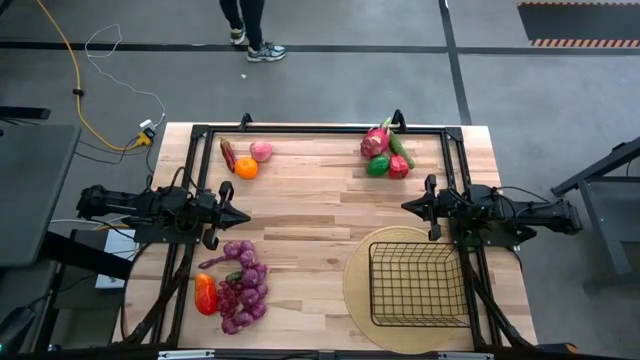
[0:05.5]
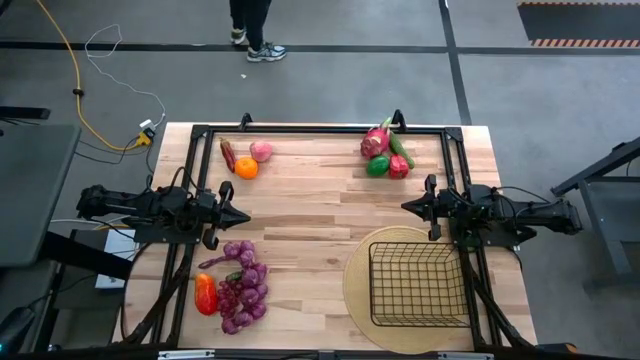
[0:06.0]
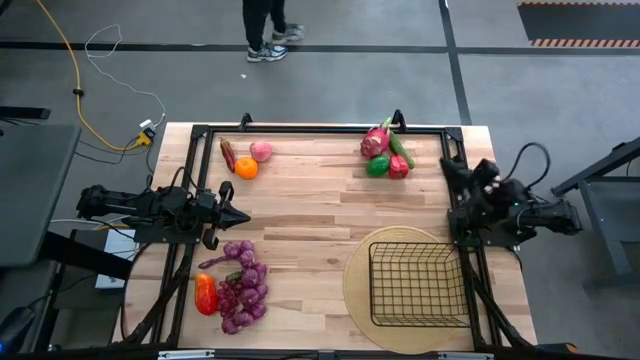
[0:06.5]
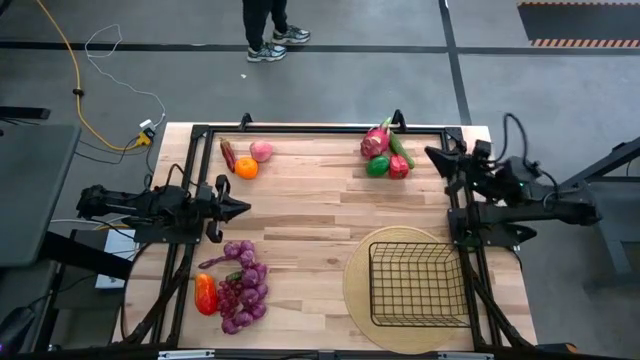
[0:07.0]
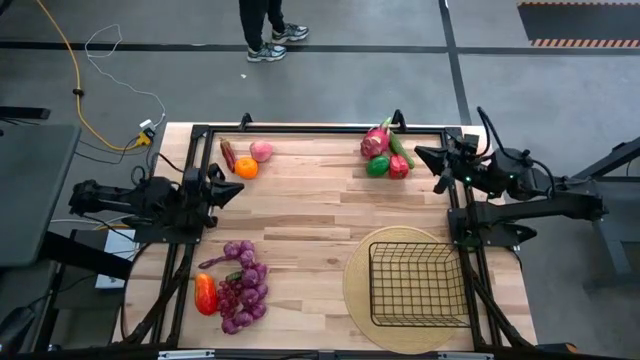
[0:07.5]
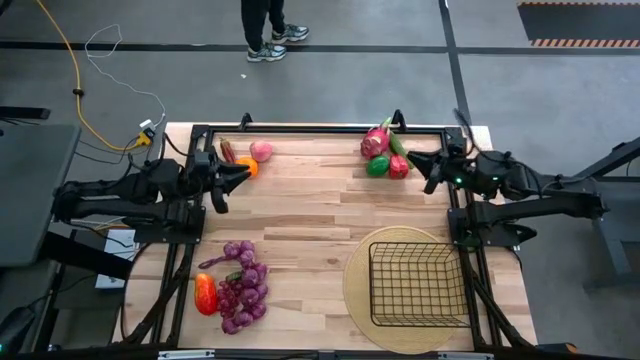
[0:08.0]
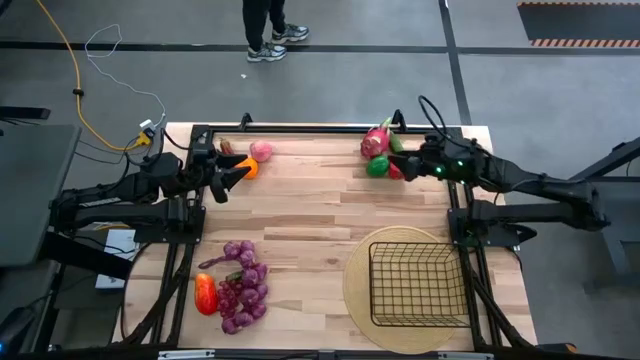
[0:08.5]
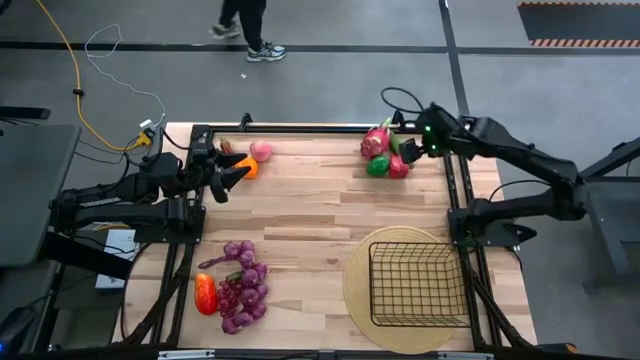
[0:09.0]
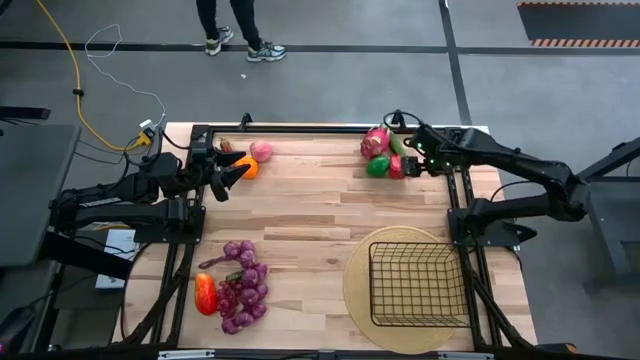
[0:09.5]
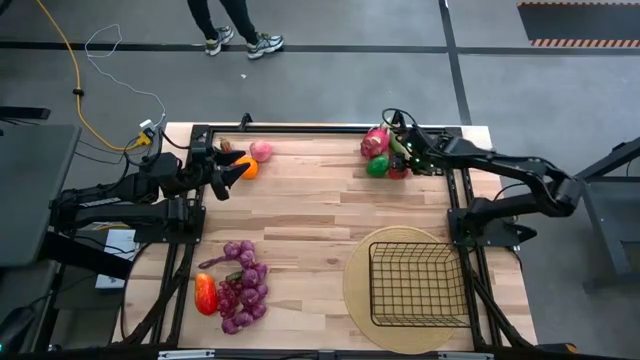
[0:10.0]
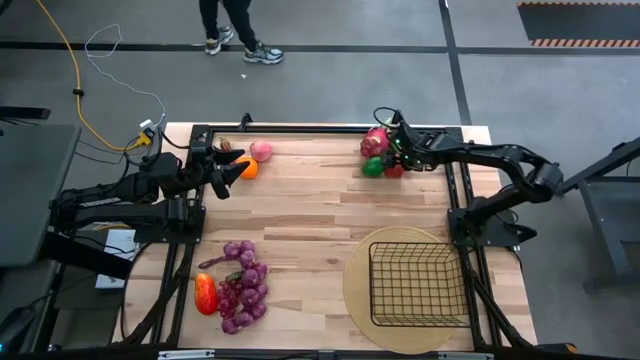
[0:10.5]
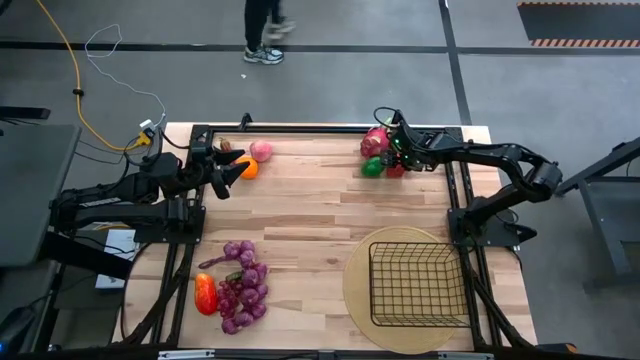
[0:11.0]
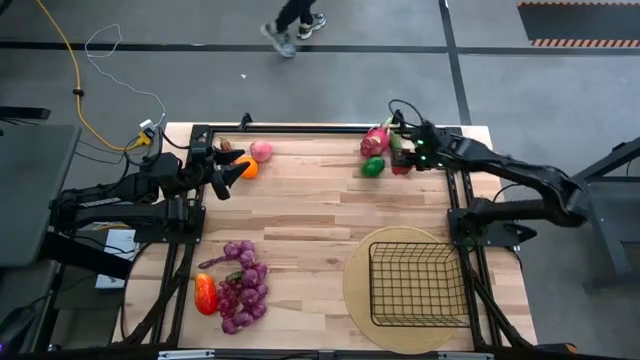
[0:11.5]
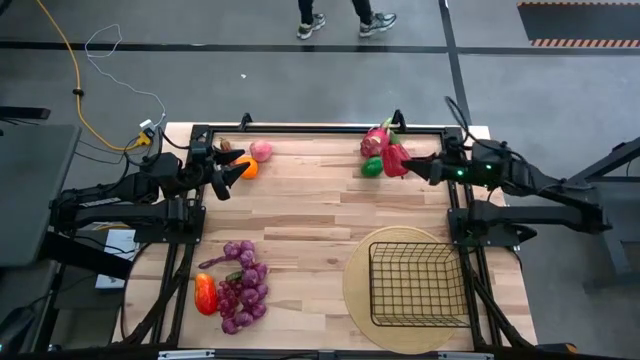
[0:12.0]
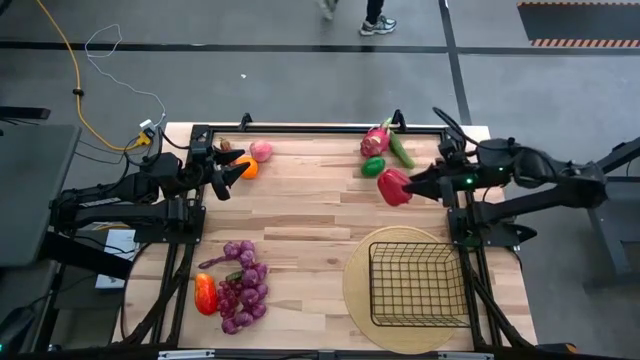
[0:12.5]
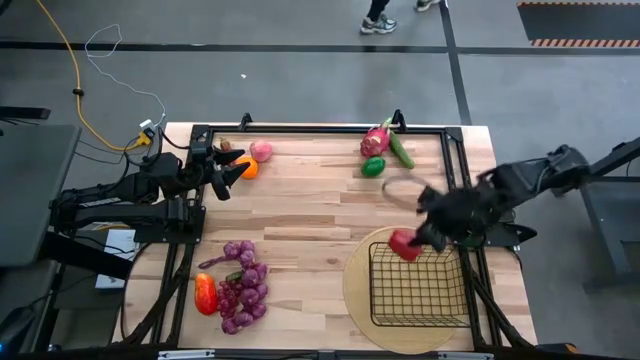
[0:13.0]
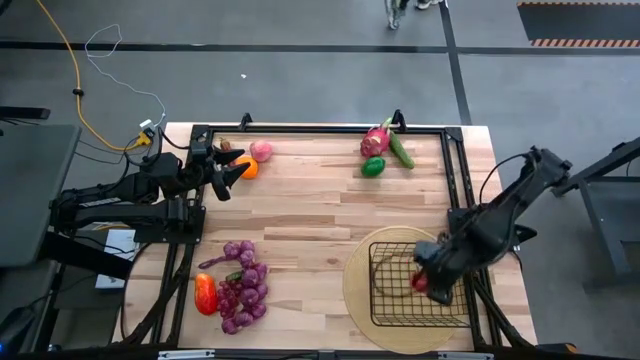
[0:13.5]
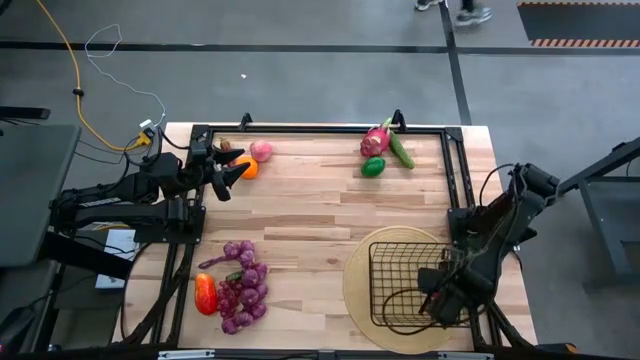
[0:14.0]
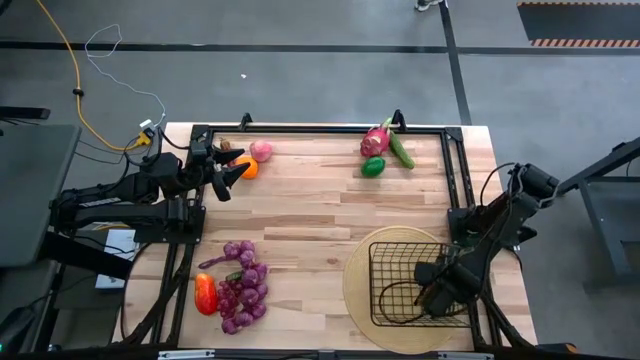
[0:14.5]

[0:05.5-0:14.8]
Task: Build produce basket
Put the bell pepper into the wire basket

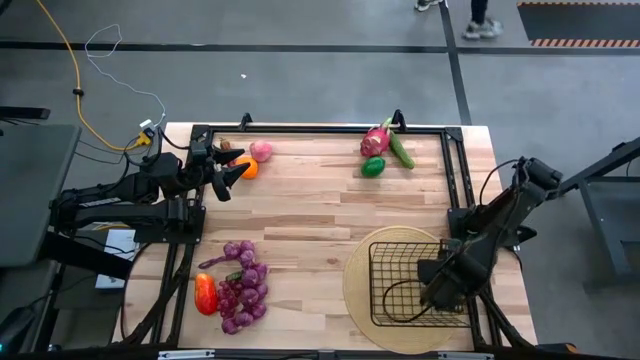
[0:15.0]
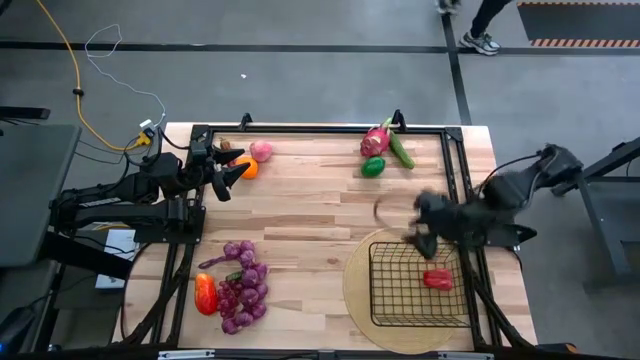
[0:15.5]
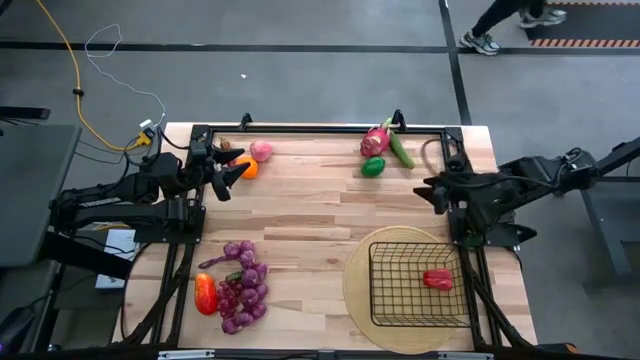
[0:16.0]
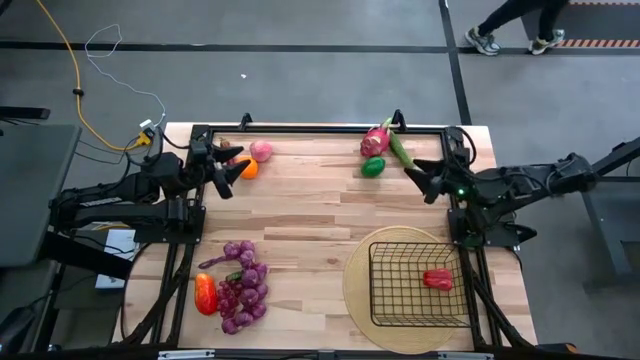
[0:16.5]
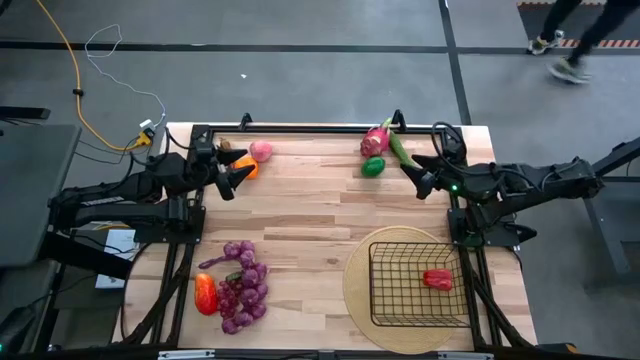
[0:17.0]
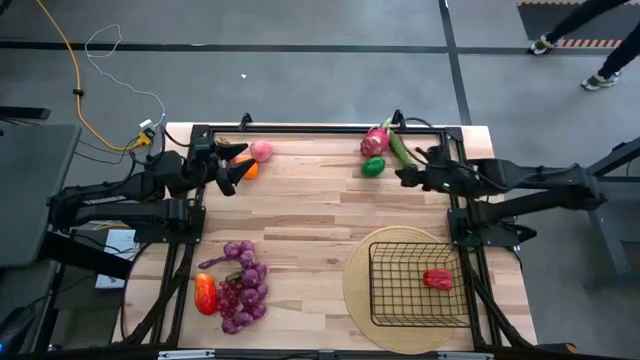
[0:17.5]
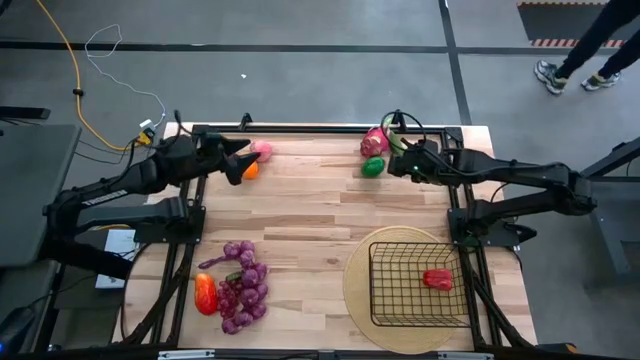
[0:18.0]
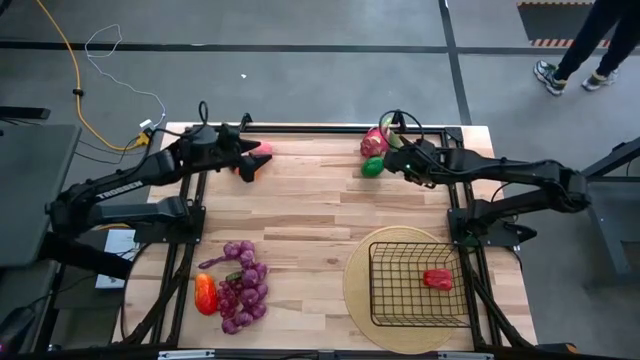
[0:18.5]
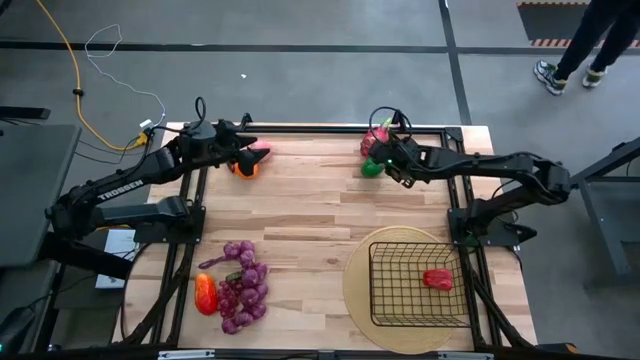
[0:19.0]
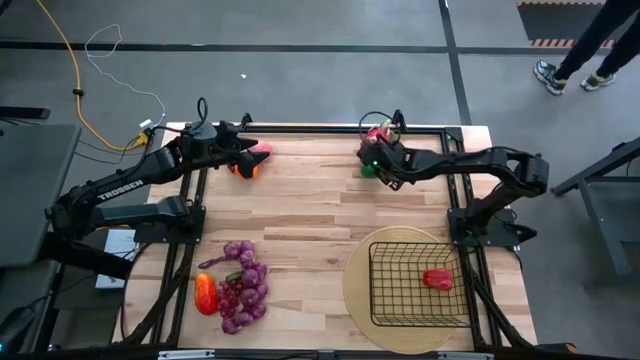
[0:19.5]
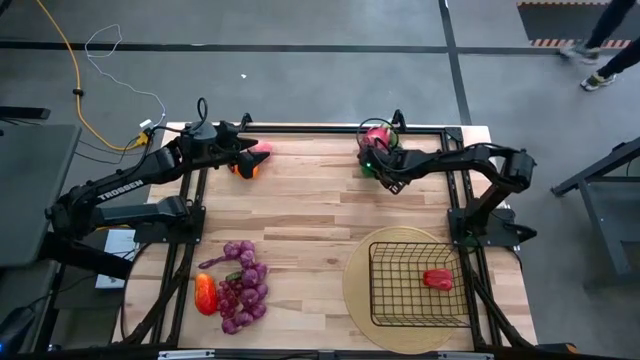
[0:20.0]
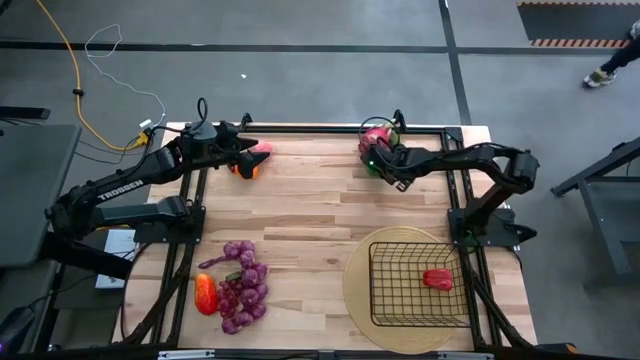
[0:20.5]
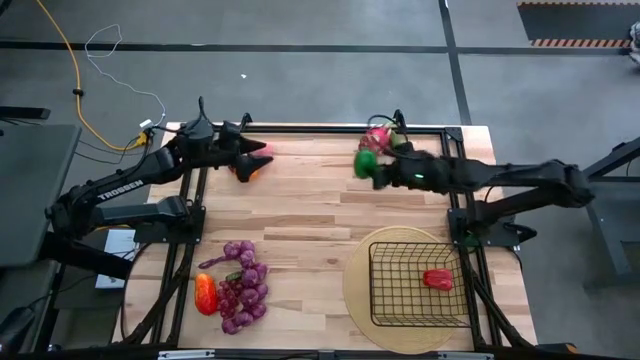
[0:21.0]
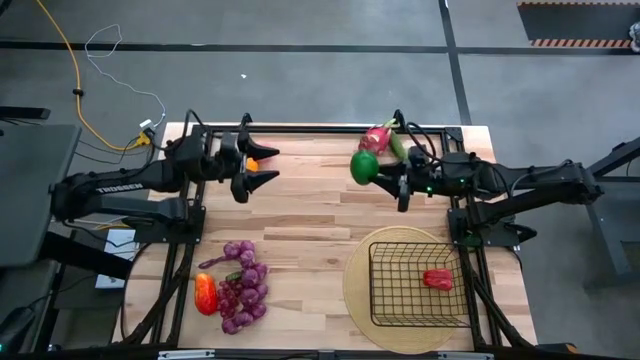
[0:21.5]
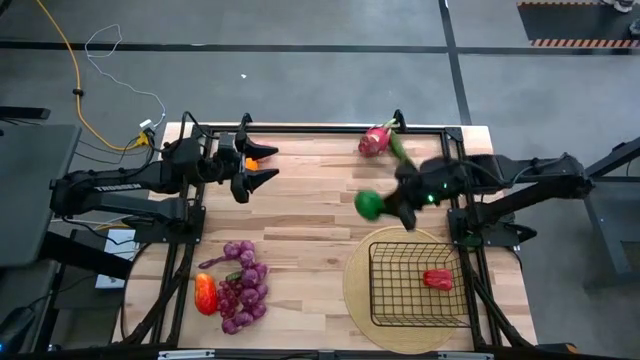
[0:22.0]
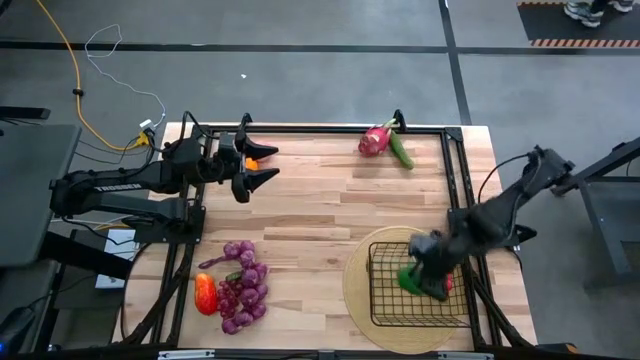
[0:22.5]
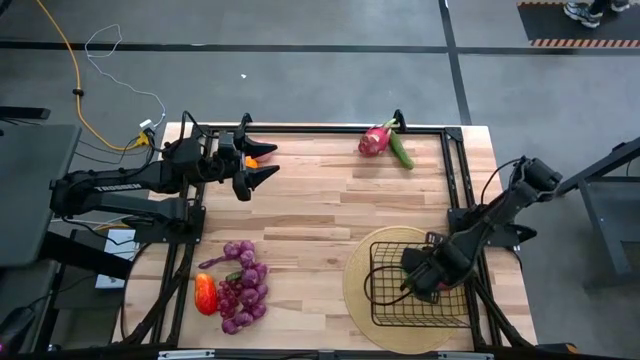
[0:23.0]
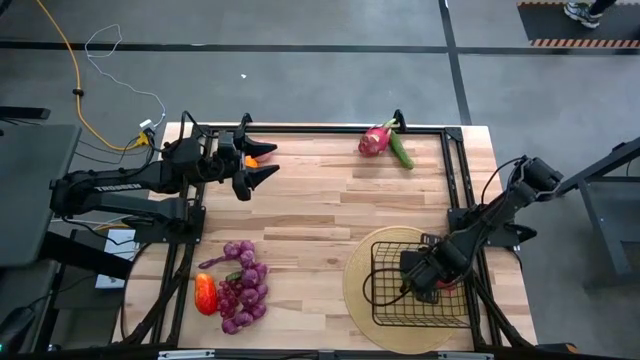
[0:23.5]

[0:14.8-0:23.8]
Put the lime into the wire basket

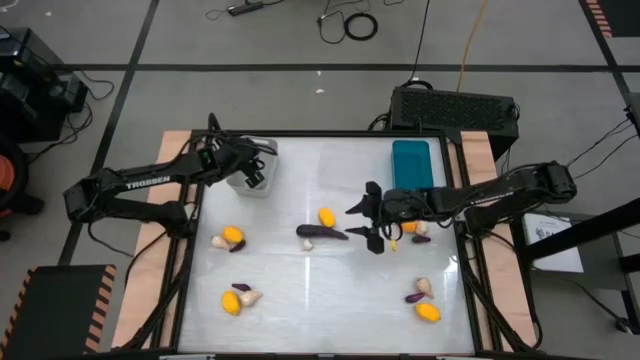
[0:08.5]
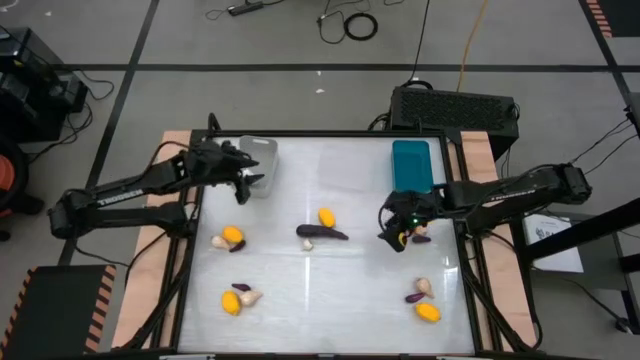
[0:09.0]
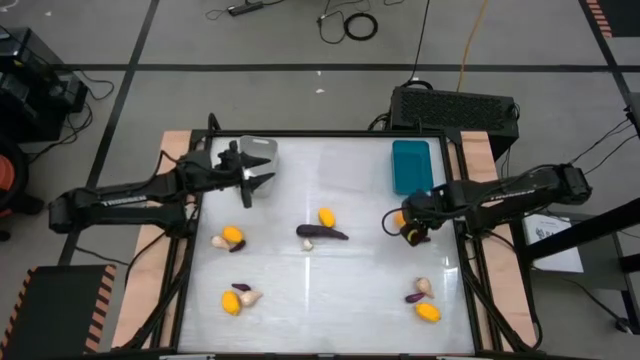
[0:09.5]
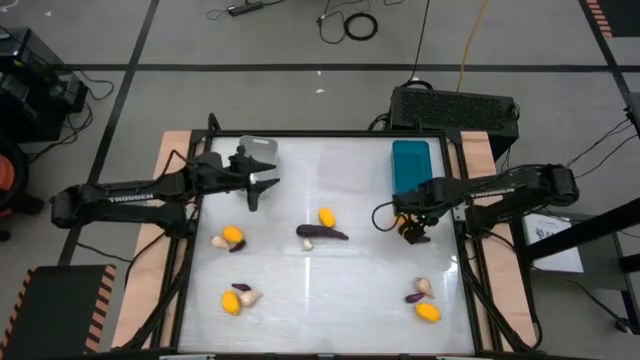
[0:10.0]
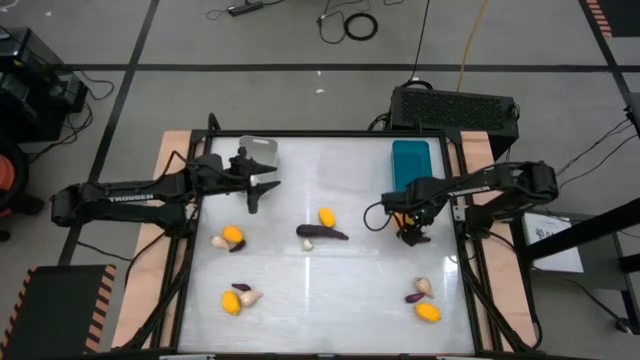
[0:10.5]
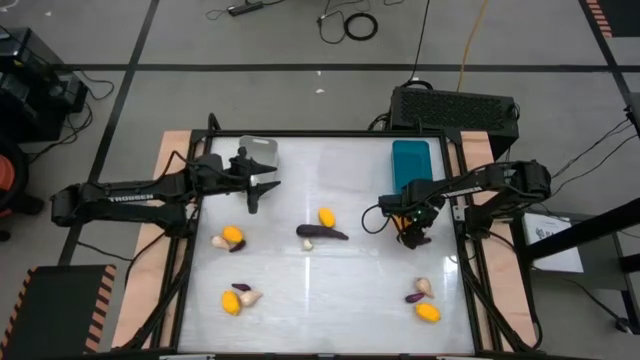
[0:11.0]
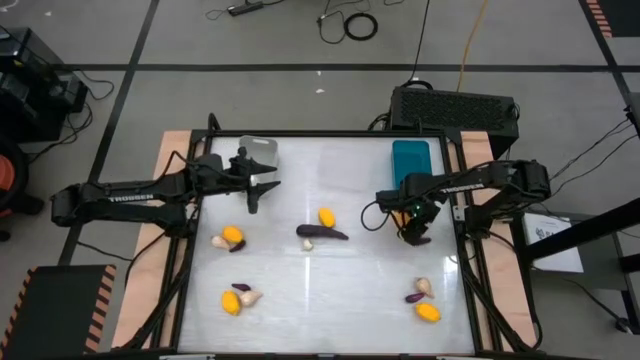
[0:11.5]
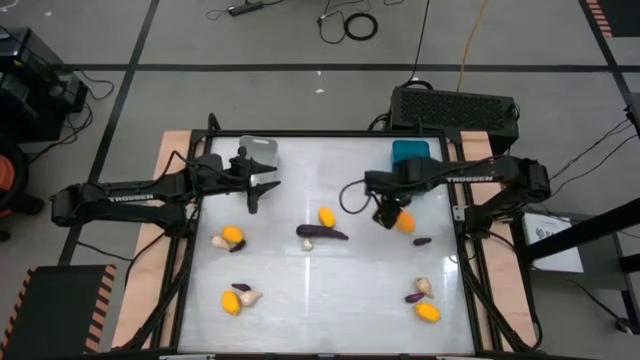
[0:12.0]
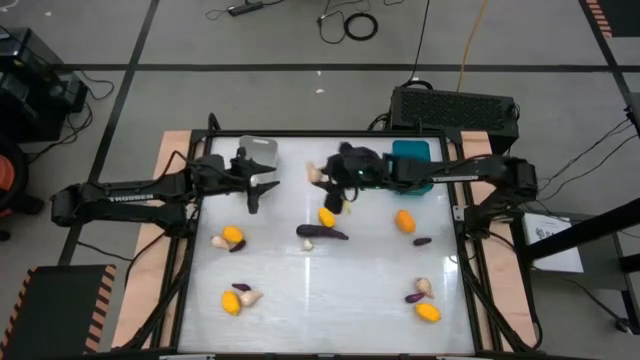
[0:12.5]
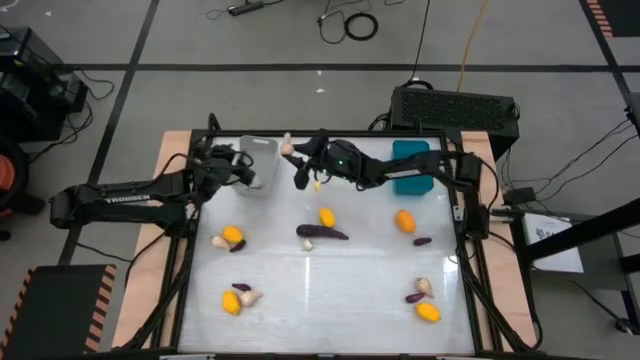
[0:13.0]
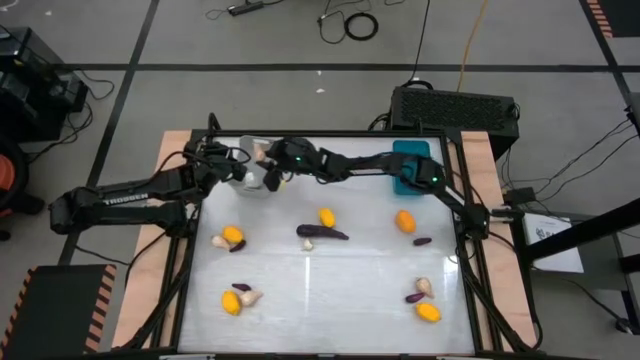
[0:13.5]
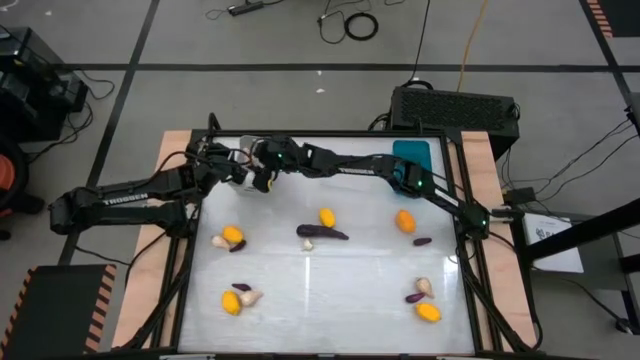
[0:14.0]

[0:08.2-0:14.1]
Task: Sort produce into baskets
Put the garlic into the gray bin
